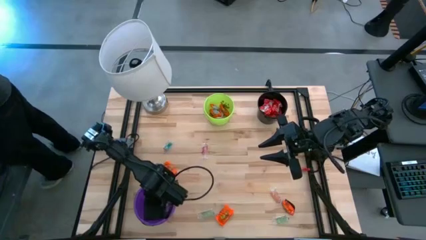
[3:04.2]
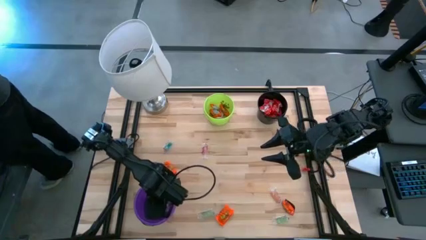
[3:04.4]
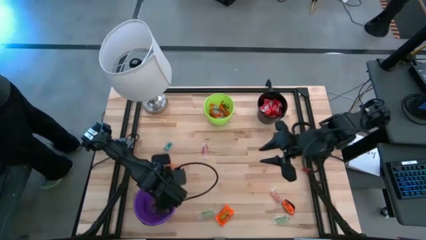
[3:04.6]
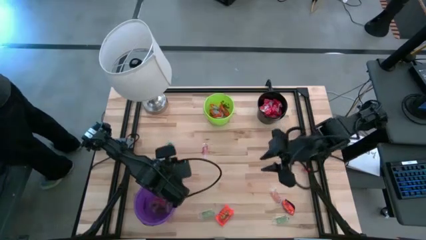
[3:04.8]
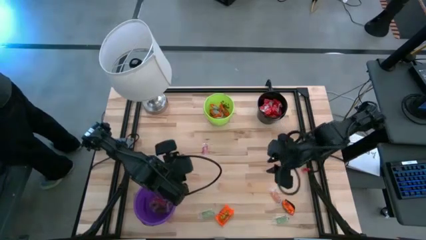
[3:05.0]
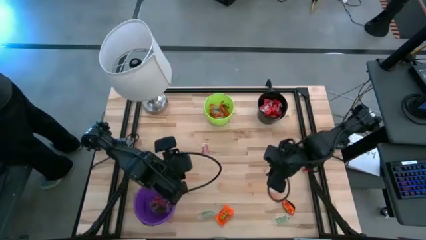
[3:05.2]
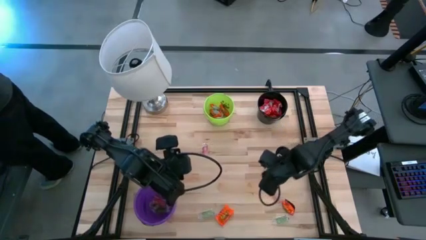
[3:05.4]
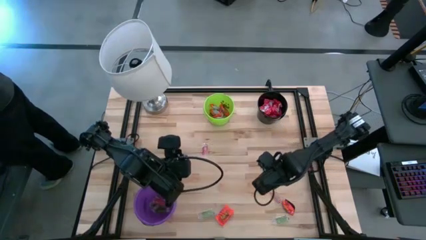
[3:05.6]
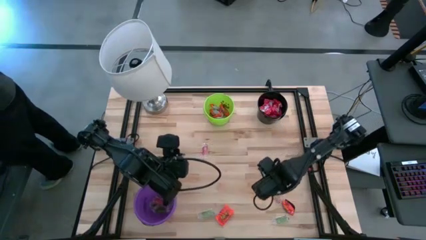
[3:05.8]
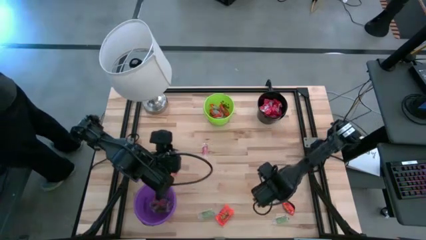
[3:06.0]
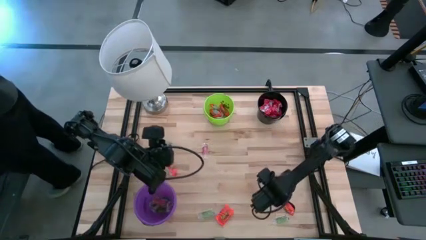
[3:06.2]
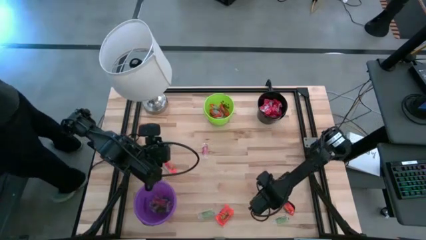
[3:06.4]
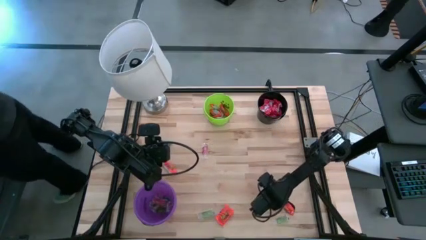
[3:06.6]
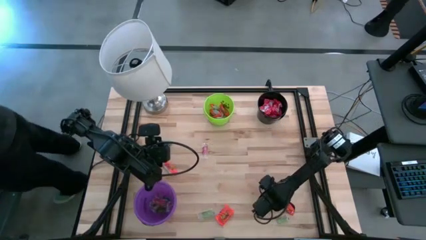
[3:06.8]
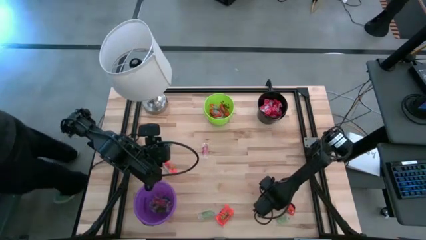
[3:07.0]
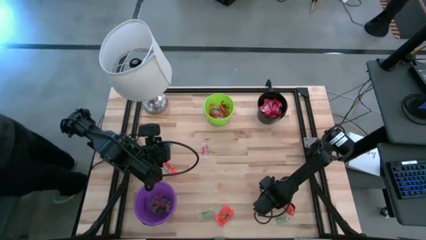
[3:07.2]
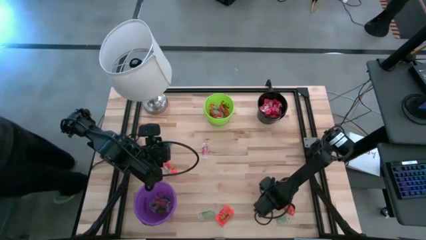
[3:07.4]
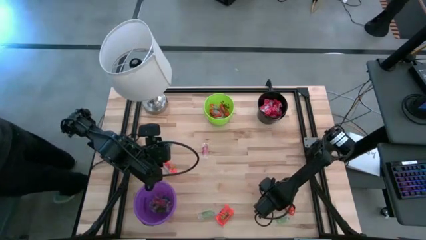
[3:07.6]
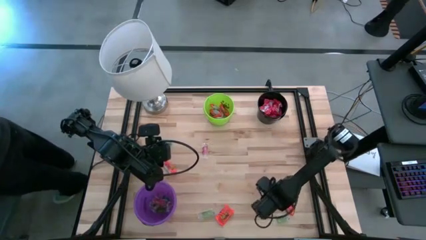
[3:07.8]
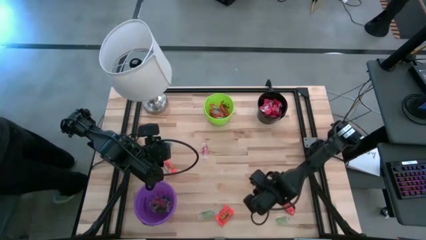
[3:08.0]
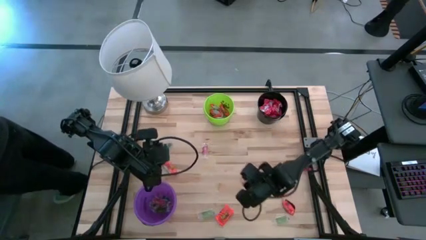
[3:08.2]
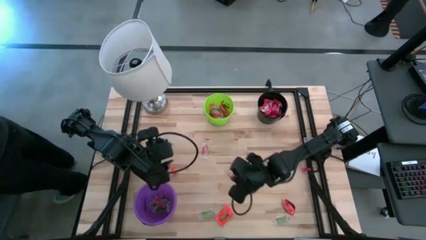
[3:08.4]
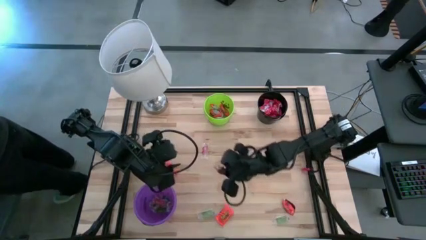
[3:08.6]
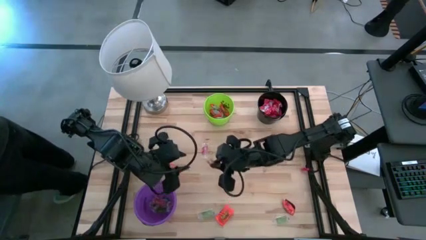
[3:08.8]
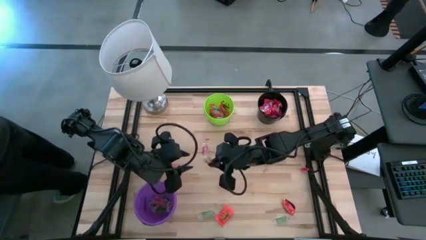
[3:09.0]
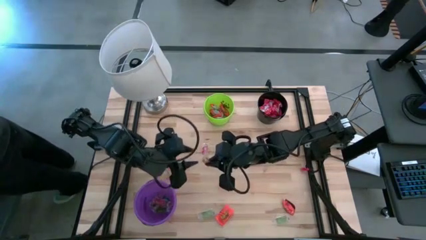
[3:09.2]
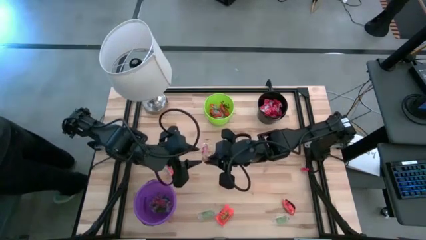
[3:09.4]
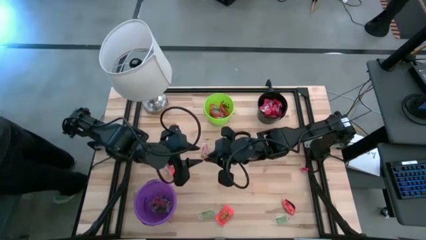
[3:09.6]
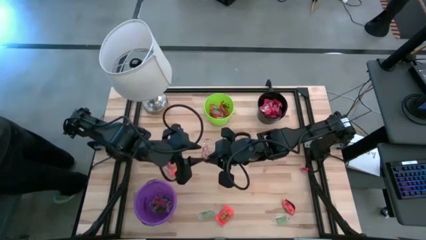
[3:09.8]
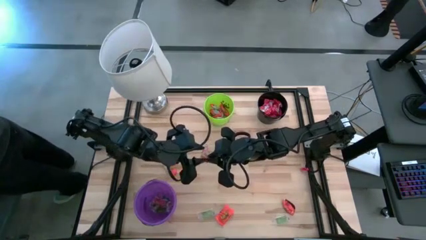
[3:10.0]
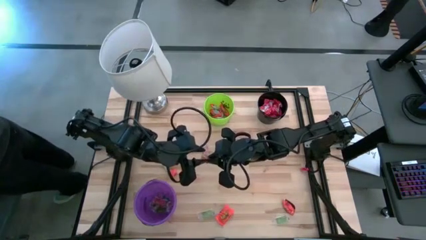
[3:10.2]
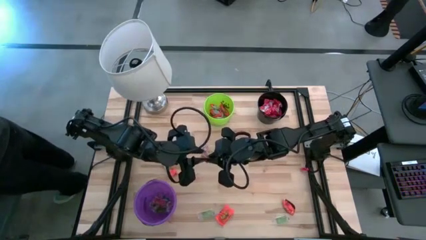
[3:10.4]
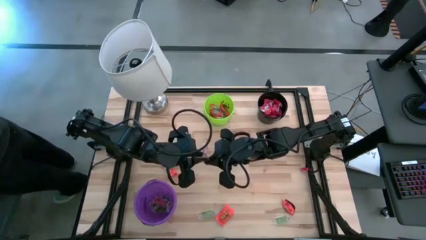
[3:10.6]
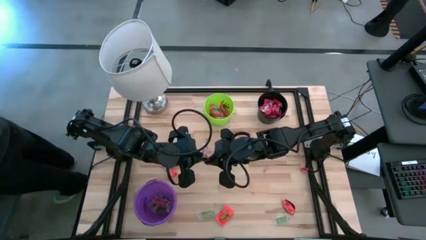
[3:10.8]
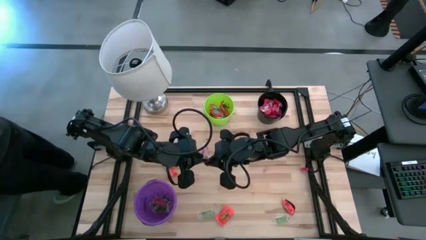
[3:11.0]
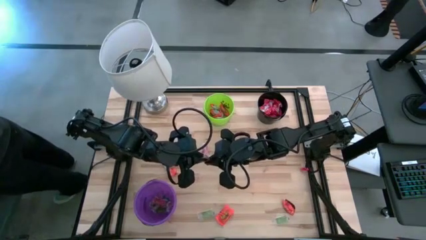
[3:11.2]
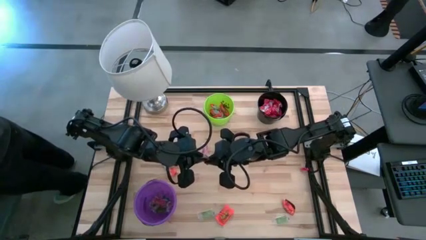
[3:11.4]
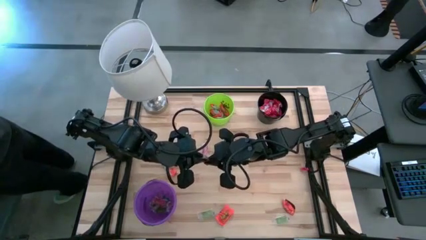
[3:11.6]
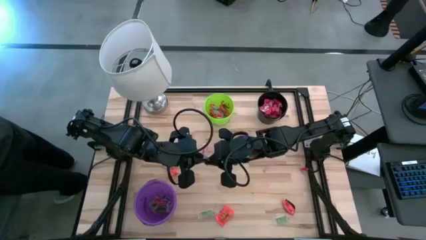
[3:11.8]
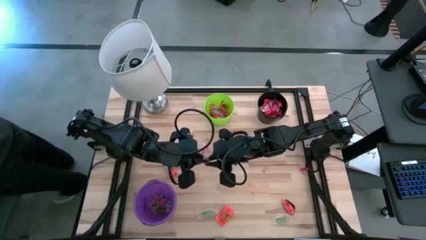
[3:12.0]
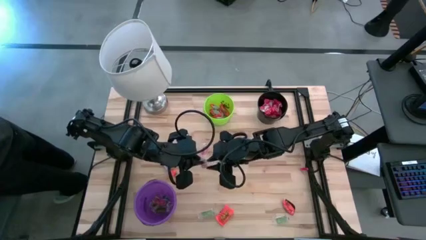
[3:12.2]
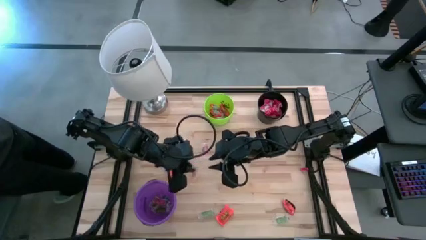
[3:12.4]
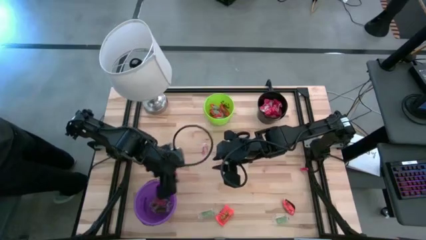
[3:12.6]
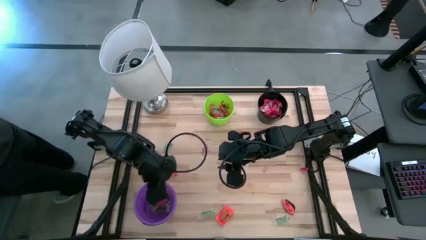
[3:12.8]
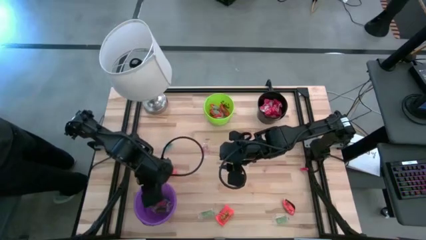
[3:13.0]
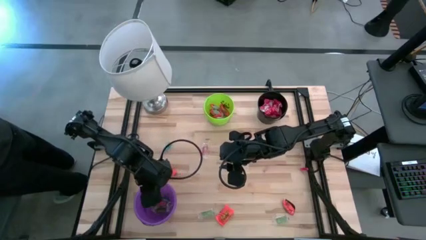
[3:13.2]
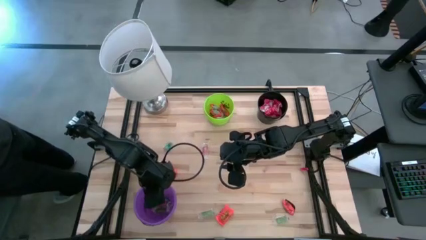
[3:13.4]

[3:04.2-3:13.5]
Task: Sort candy
Put the orange gummy into the violet bucket

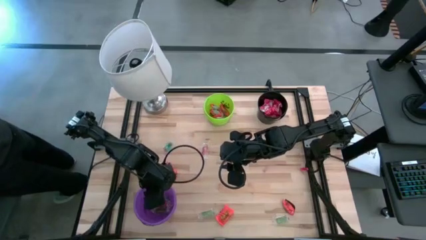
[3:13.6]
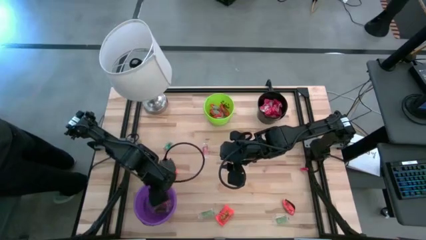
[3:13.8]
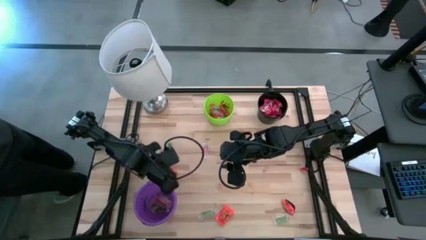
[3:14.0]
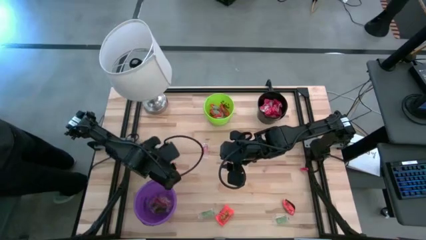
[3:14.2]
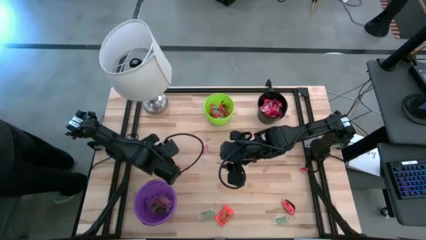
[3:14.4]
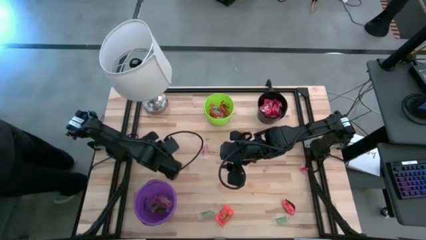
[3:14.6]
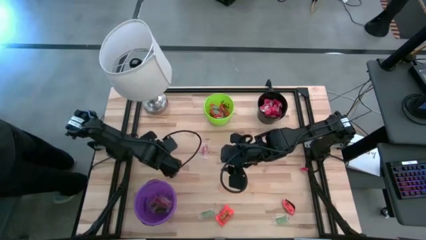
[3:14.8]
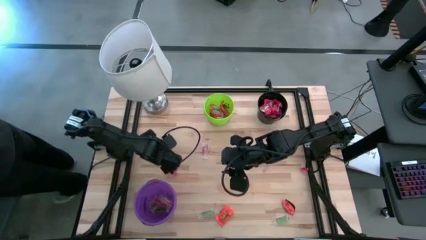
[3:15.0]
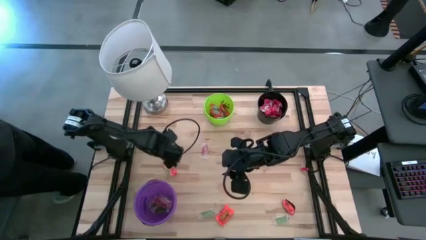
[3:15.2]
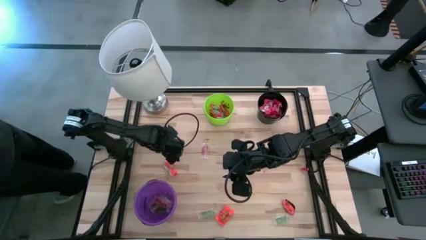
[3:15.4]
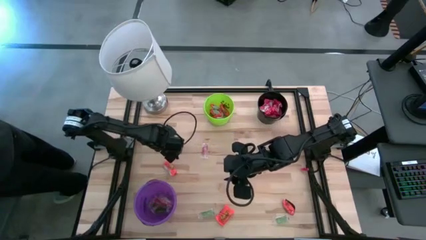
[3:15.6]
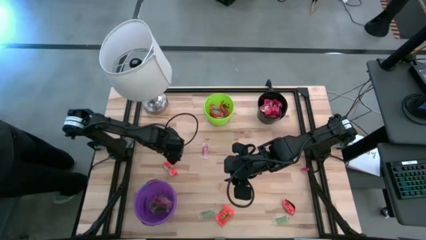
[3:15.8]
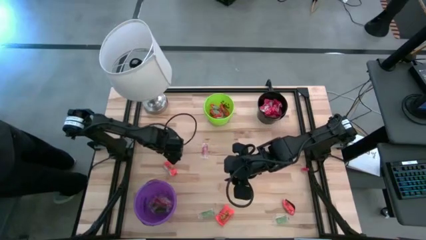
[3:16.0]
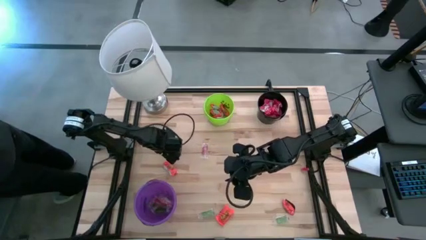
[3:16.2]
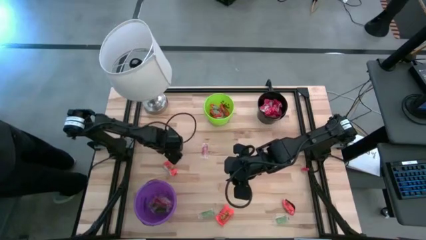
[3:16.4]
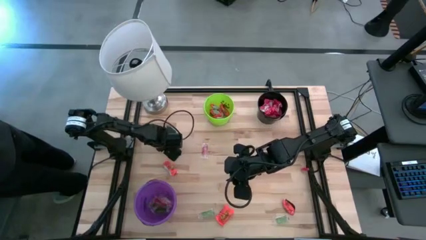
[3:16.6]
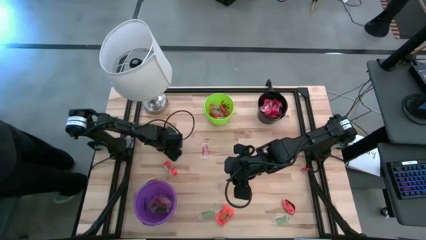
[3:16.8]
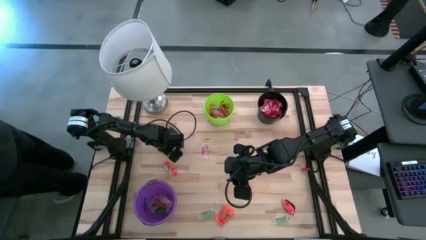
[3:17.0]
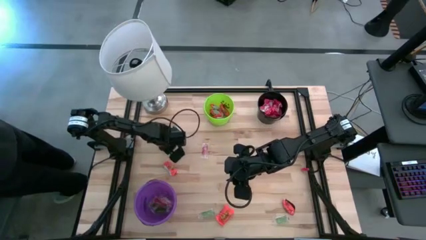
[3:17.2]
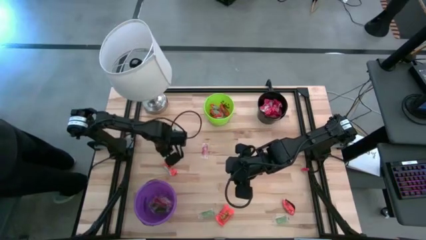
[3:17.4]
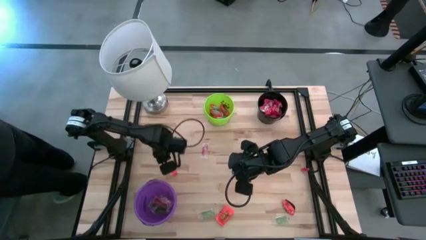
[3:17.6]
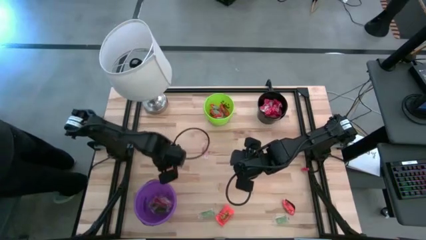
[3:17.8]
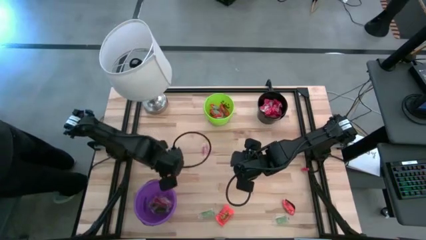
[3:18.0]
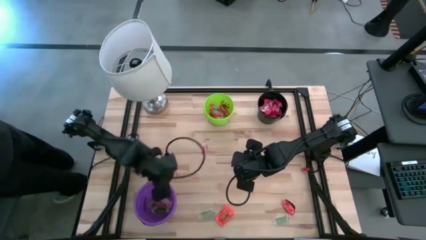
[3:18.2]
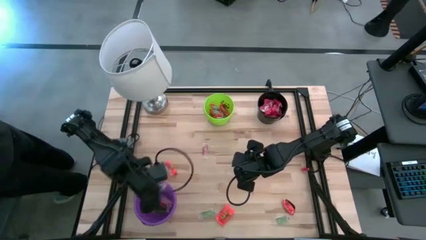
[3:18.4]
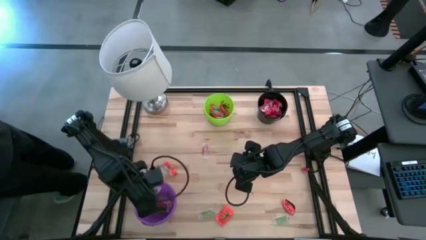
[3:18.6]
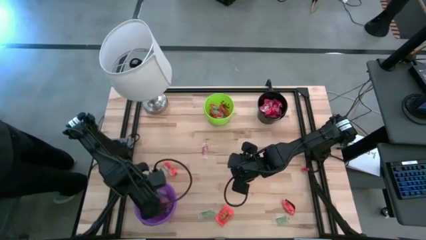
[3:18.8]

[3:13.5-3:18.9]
Put the blue gummy into the violet bucket

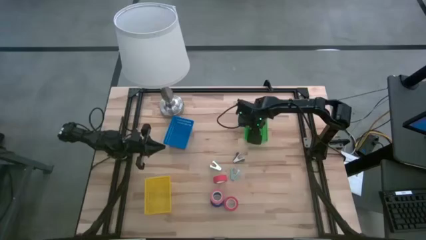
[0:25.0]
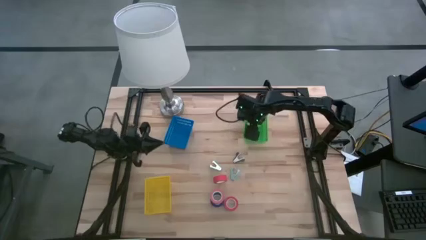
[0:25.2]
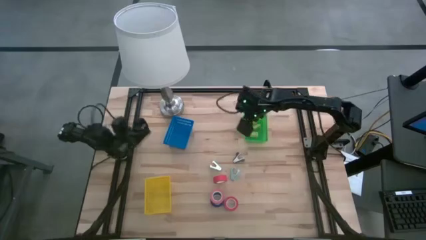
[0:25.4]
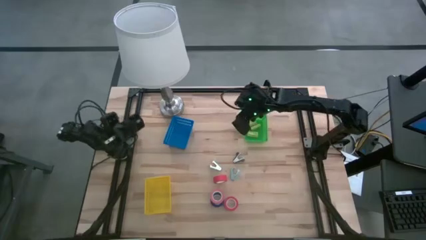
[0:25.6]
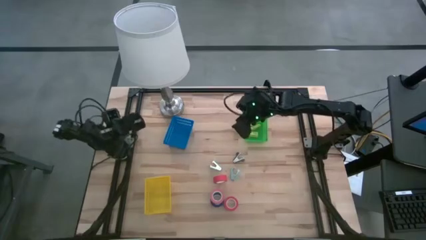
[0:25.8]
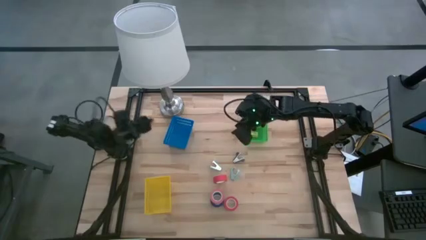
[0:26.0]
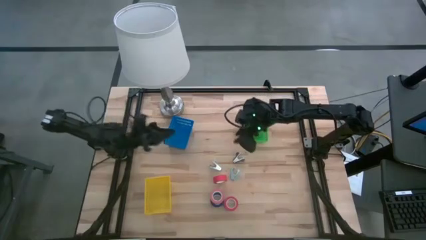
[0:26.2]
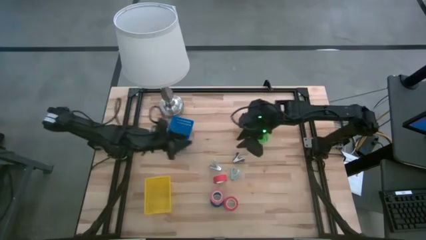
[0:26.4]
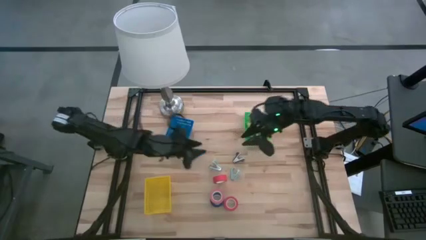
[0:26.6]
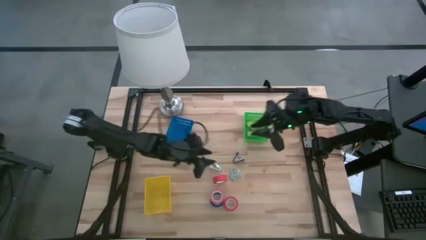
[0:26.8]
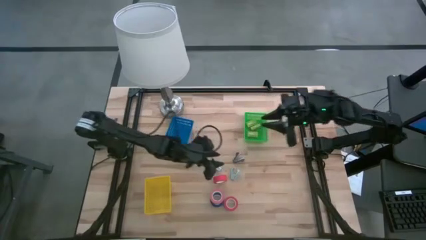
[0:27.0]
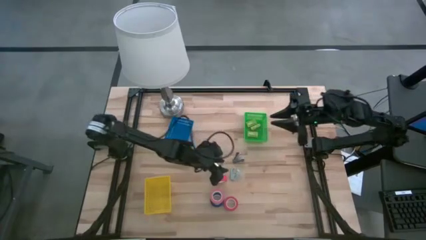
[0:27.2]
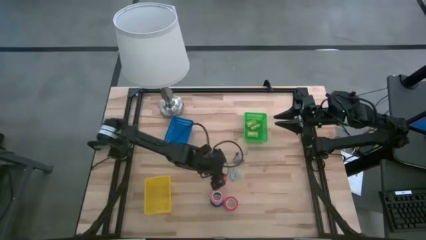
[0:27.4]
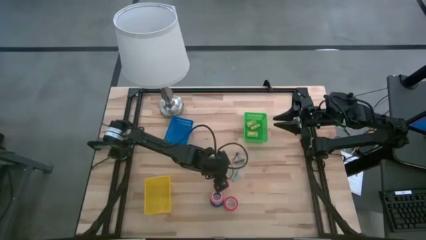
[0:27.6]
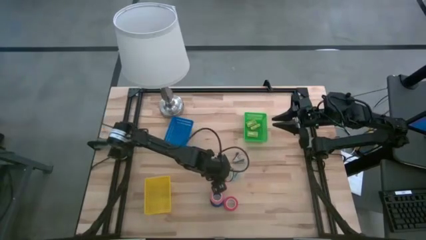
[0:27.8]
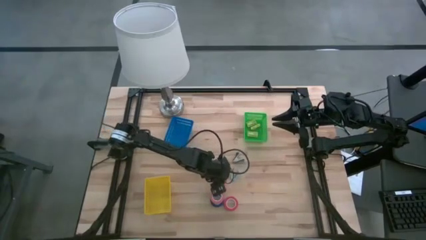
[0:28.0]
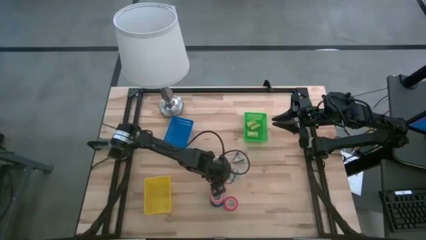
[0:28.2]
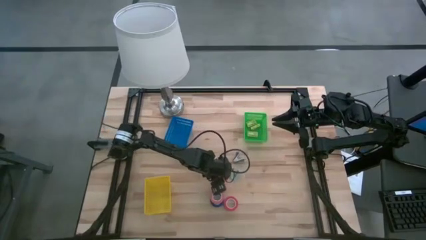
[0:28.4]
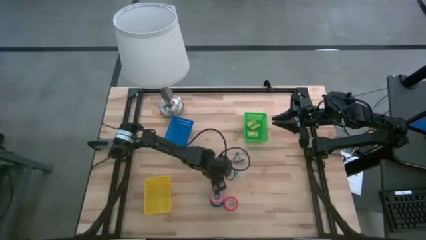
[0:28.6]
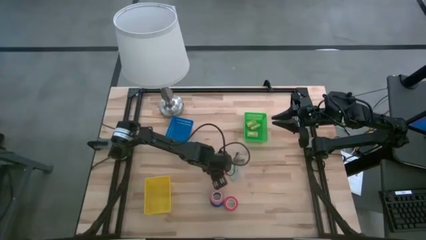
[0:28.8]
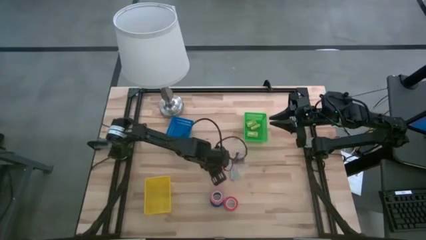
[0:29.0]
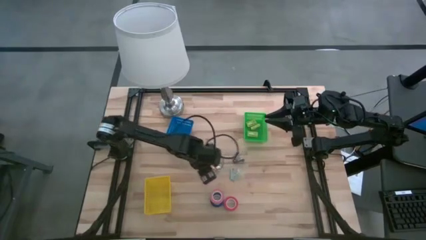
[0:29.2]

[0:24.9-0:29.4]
Task: Pick and place Stapler, Stapler remover, tape
Put the top orange tape into the yellow bin
